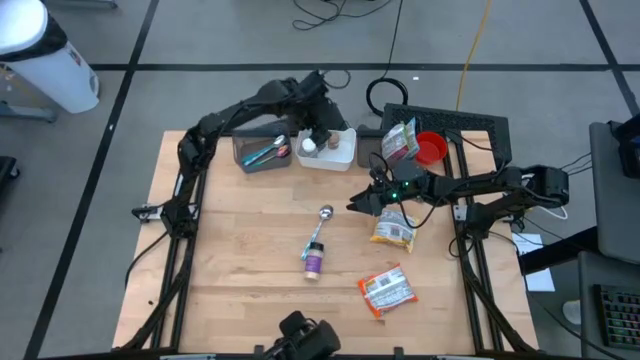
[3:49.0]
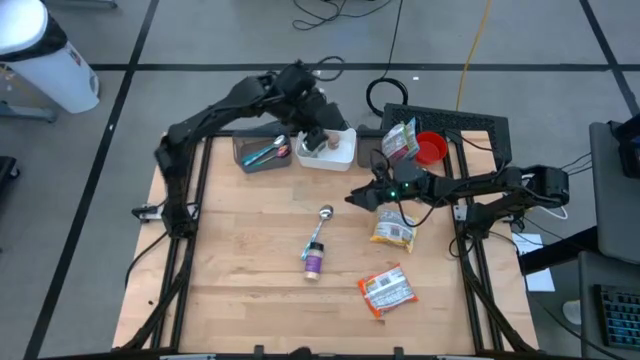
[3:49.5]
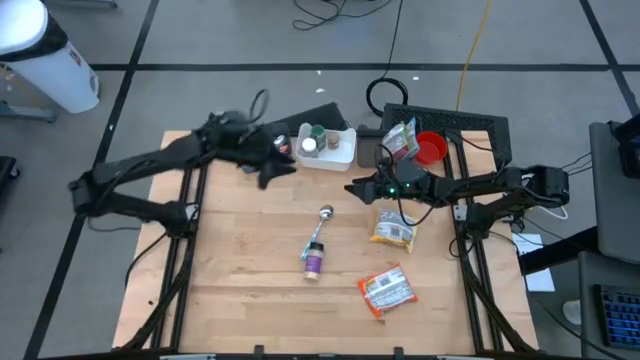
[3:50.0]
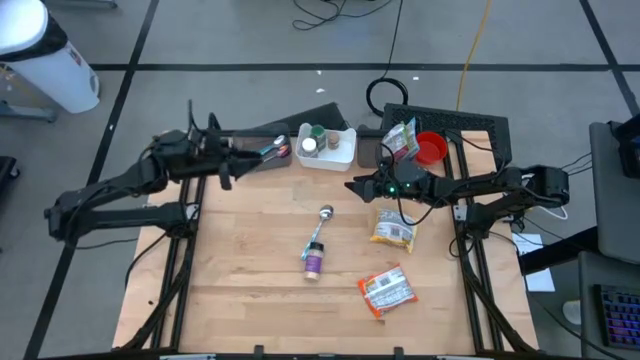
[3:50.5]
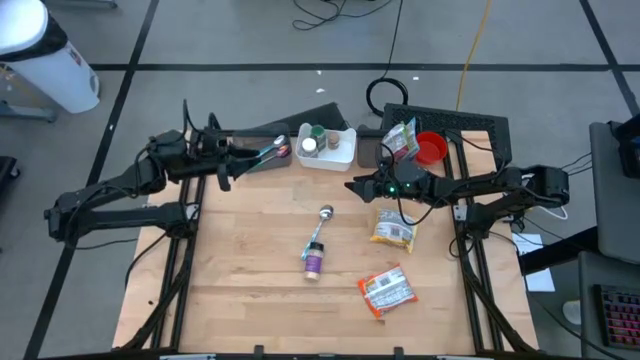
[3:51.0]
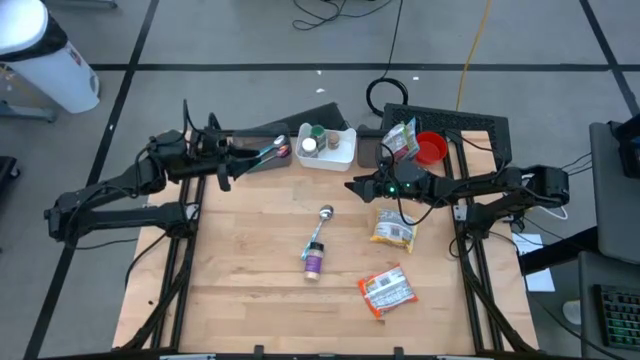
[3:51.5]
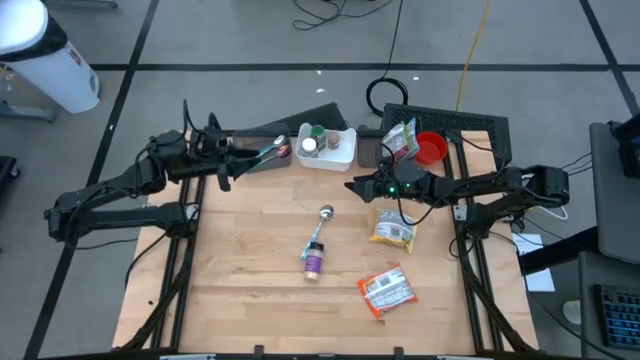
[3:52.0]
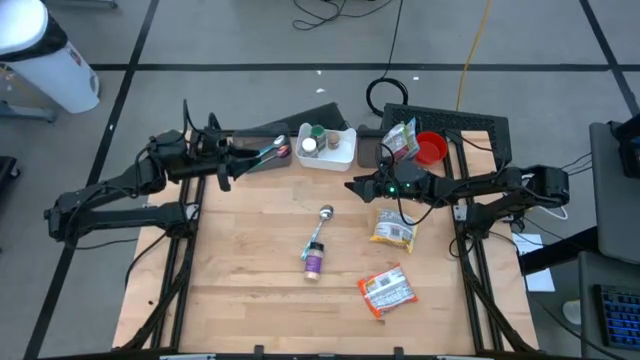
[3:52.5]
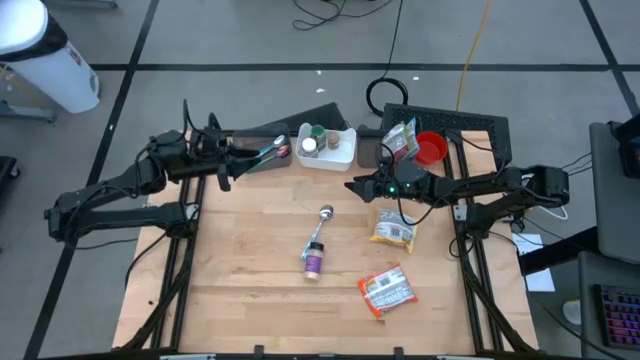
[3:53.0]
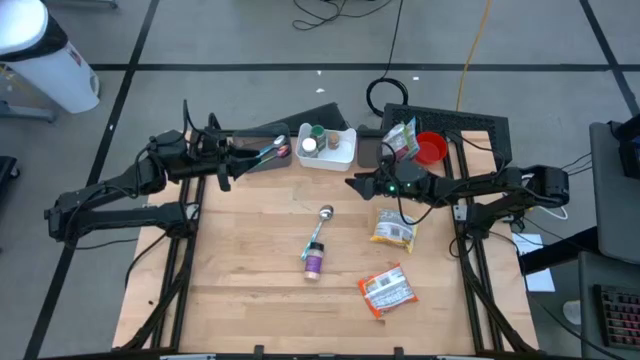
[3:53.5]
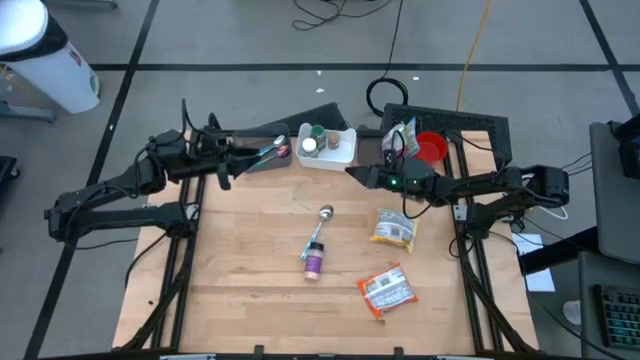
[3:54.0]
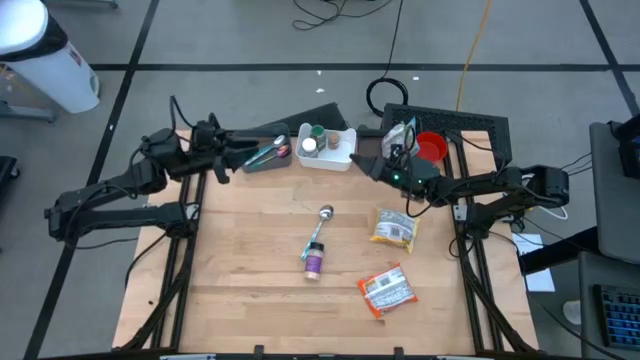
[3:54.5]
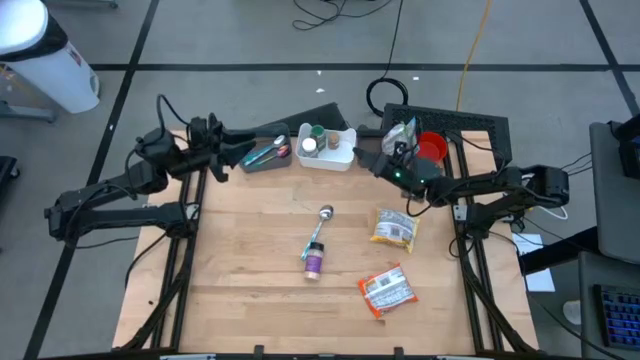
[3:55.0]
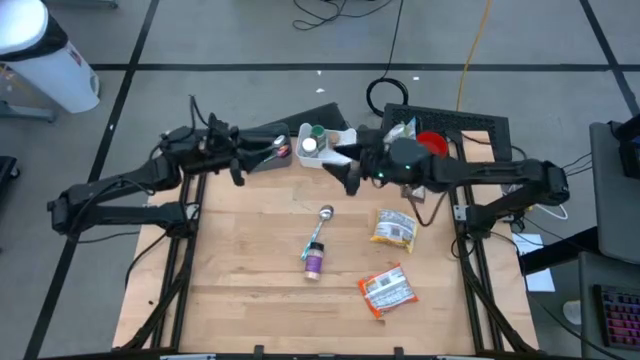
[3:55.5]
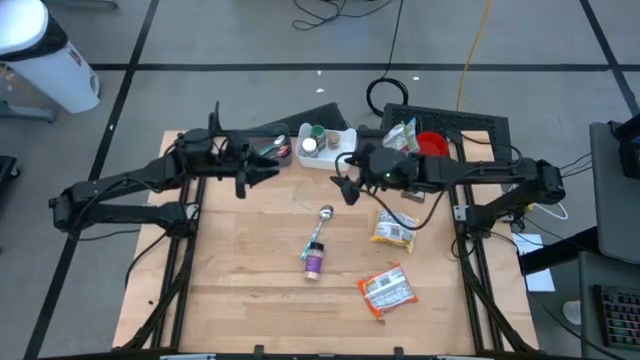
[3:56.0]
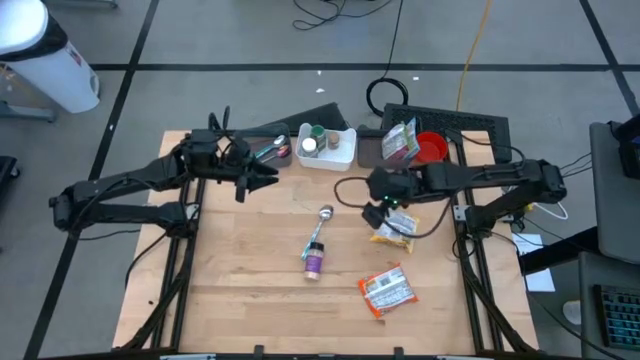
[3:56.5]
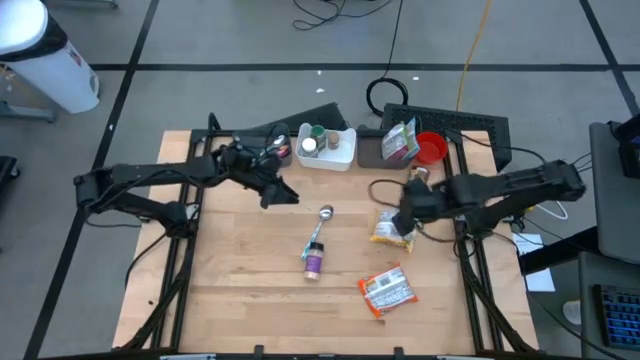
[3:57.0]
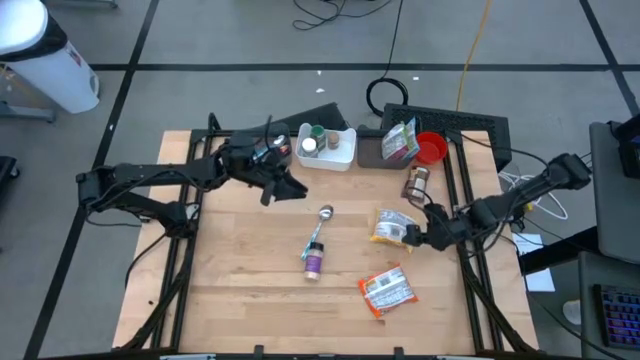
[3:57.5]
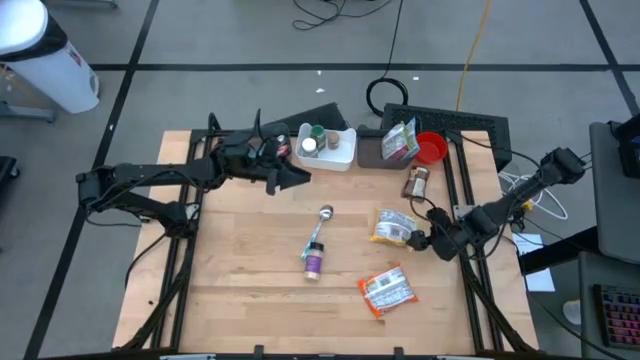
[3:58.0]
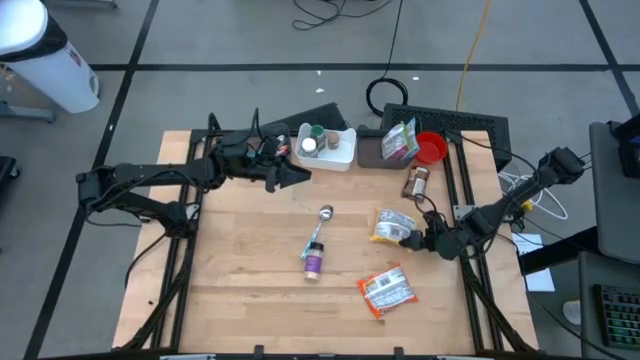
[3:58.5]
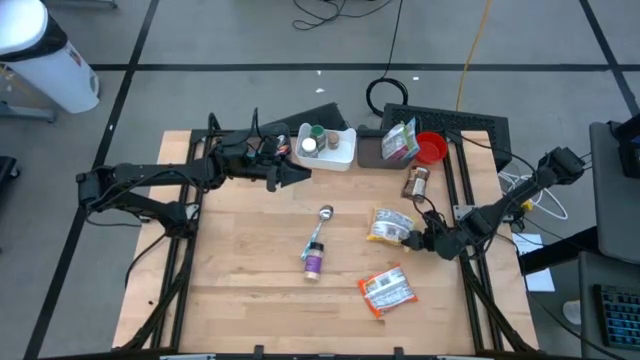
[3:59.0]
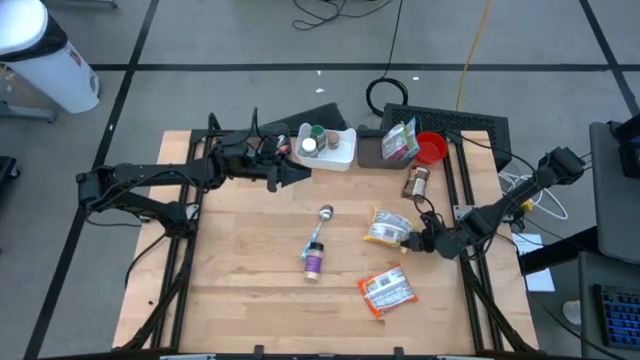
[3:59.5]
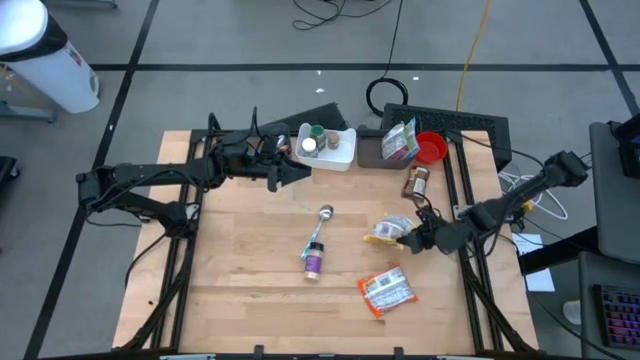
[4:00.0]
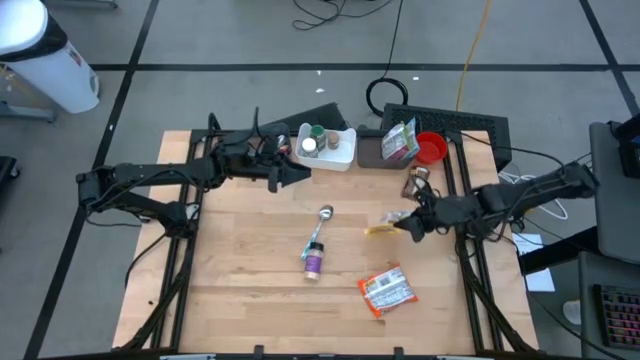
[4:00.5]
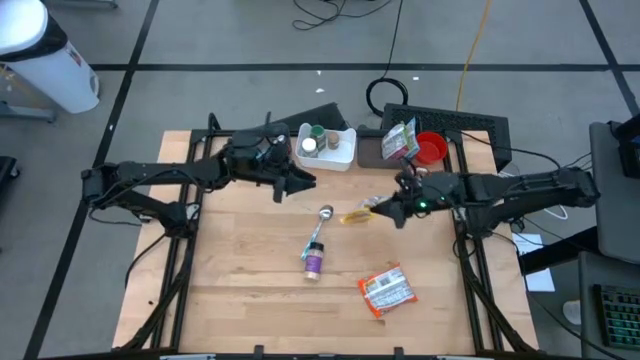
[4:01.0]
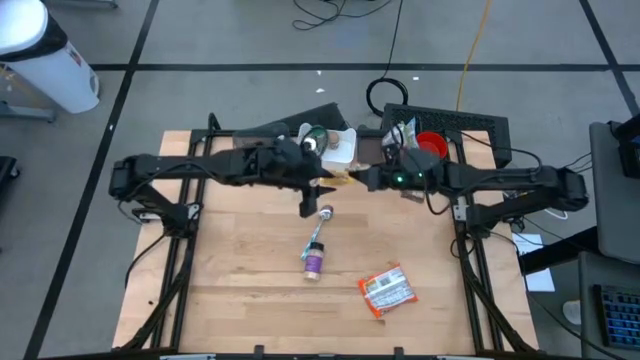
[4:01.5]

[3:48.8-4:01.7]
Task: Pick & Place Food Item
Put the yellow noodle pack into the right black bin

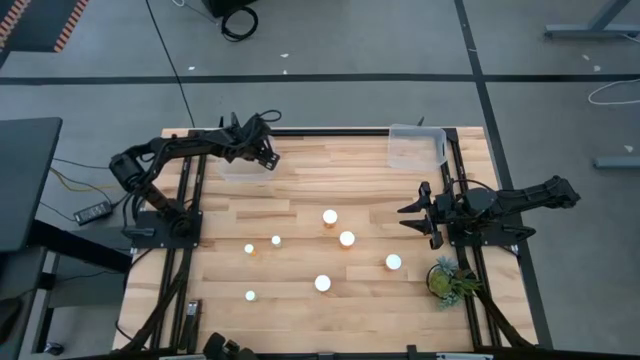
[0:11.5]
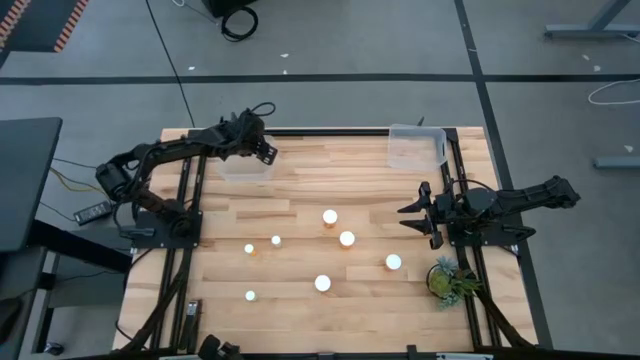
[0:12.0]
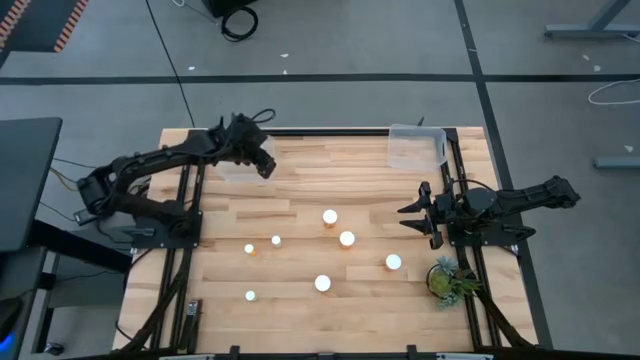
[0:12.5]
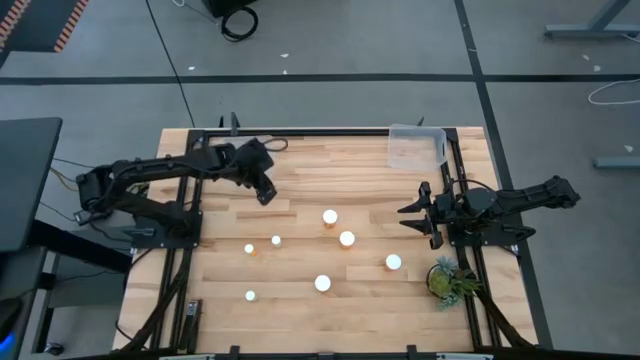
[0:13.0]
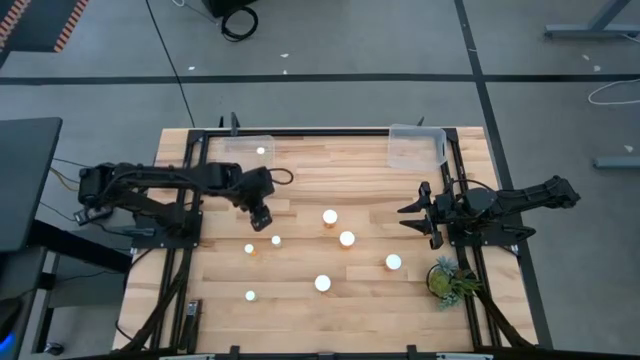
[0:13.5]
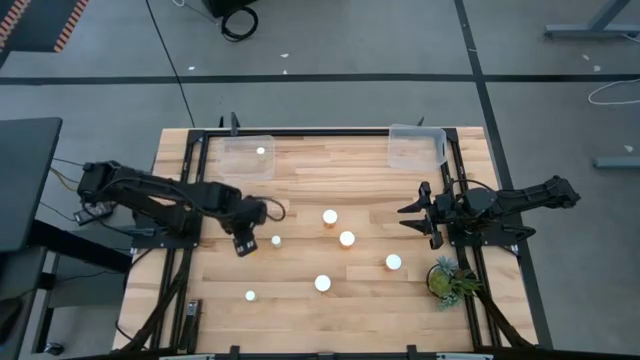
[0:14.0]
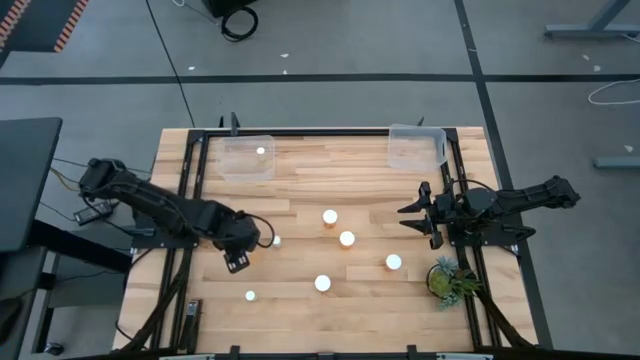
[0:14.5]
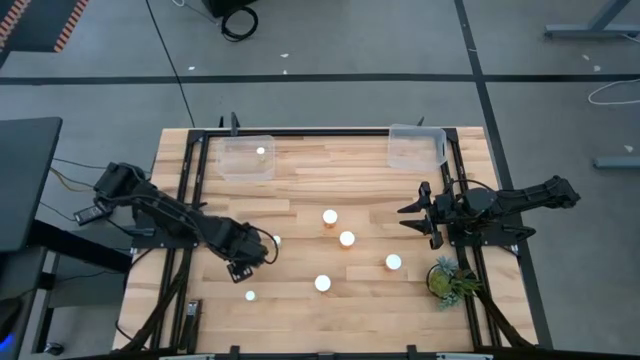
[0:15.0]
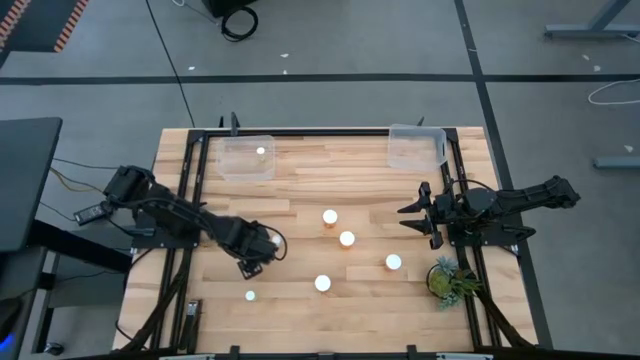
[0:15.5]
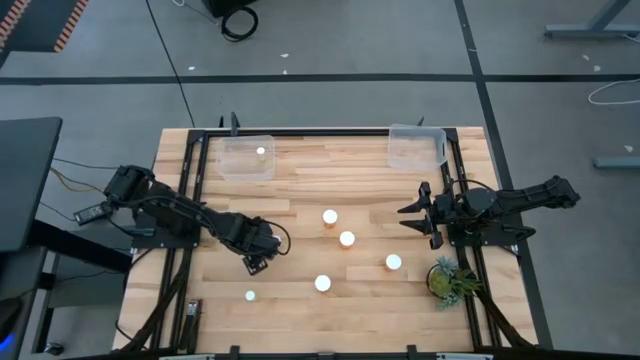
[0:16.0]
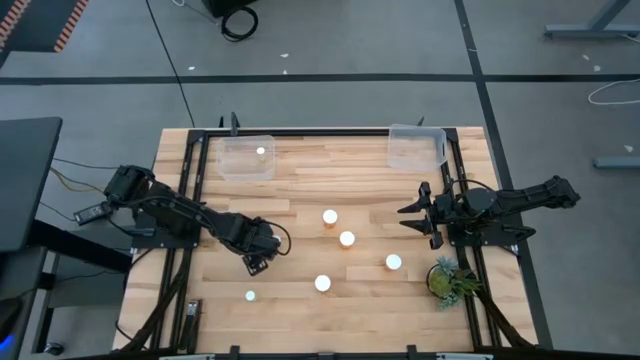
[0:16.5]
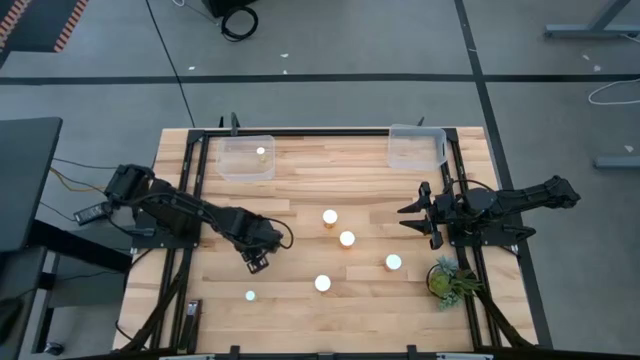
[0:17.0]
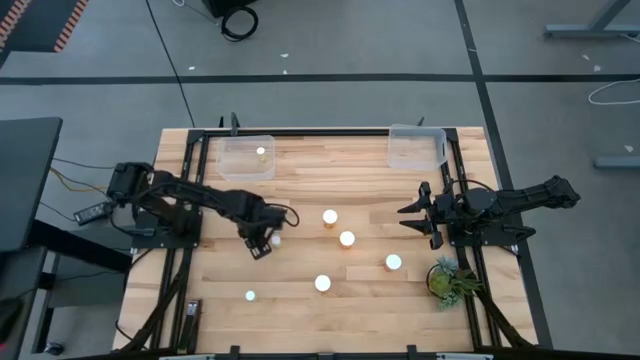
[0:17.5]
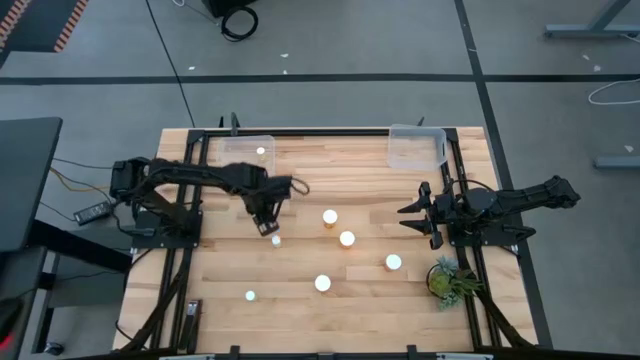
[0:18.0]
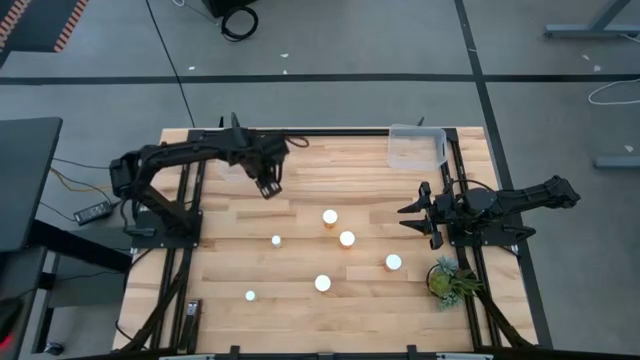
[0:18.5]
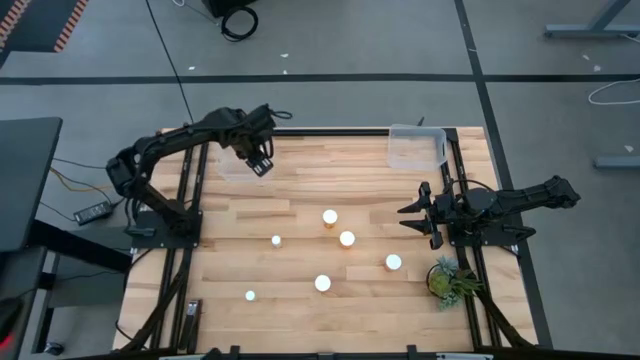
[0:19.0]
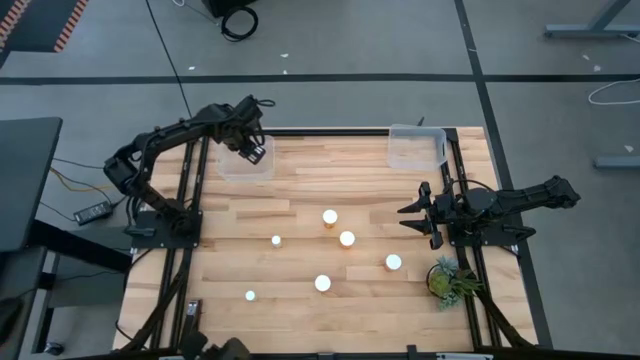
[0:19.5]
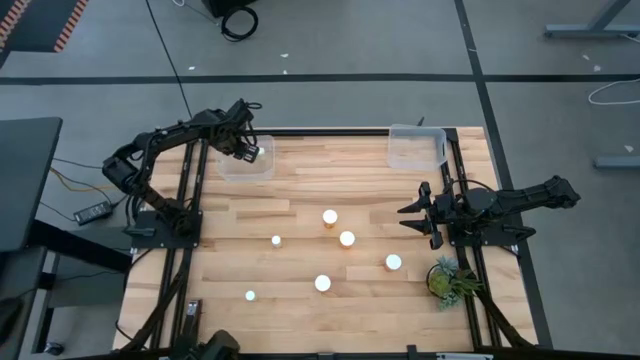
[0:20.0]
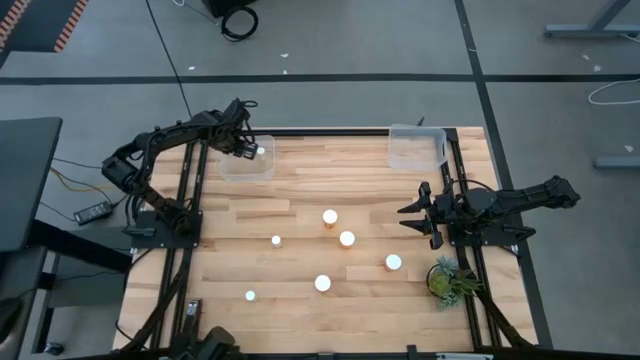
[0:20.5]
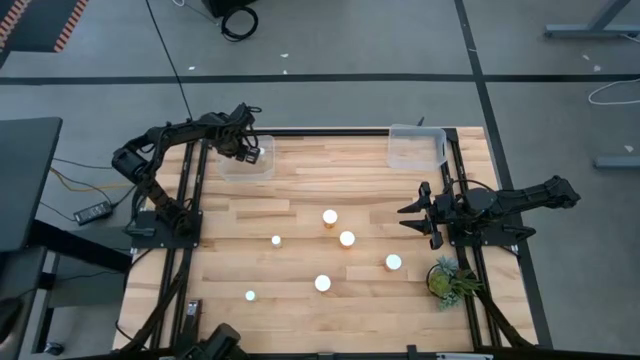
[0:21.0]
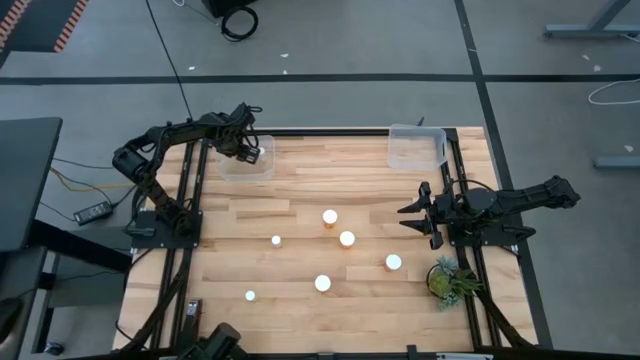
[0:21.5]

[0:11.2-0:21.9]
Task: Pick and place medicine bottles into bin by pill shape (circle, oval)
Put the orange tablet bottle into the left transparent bin
